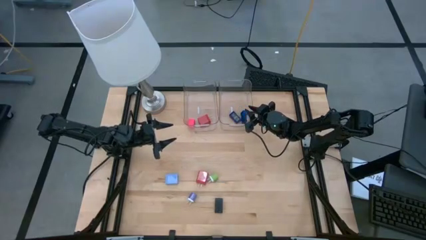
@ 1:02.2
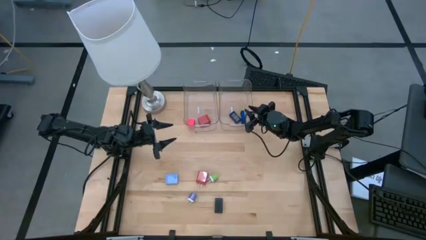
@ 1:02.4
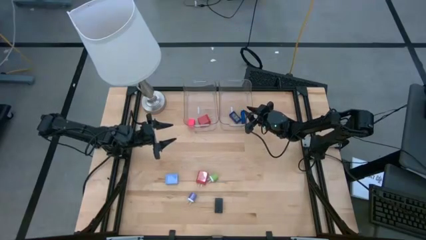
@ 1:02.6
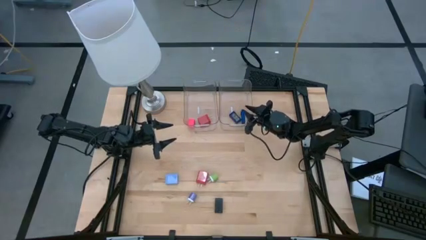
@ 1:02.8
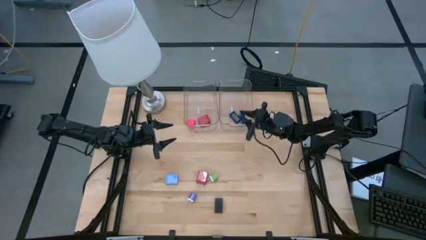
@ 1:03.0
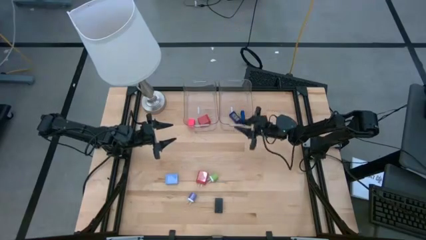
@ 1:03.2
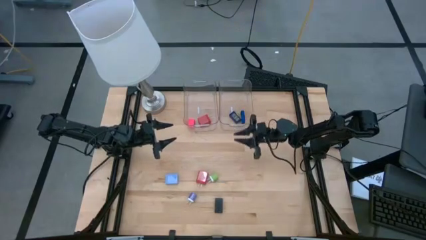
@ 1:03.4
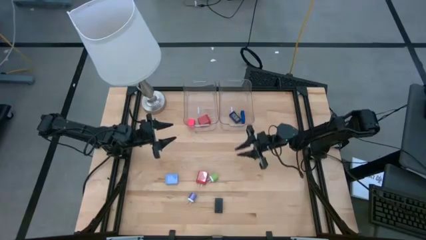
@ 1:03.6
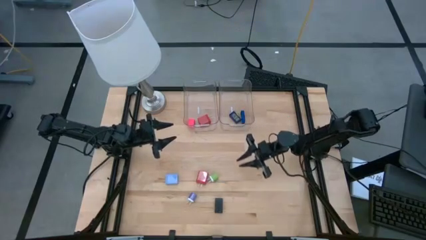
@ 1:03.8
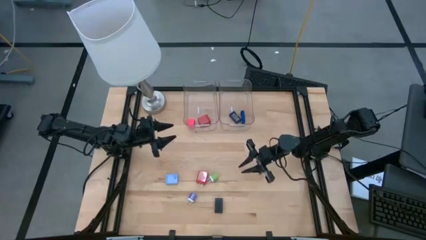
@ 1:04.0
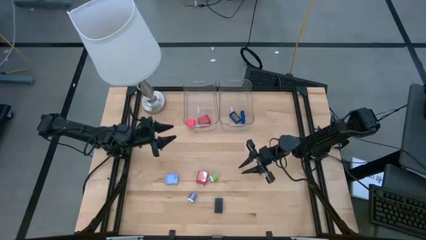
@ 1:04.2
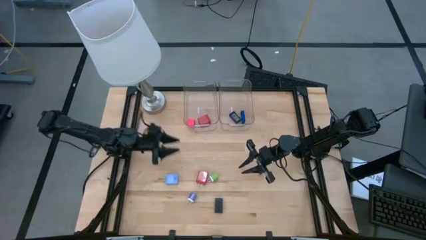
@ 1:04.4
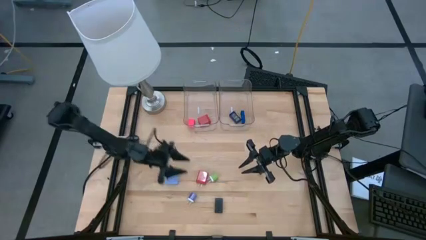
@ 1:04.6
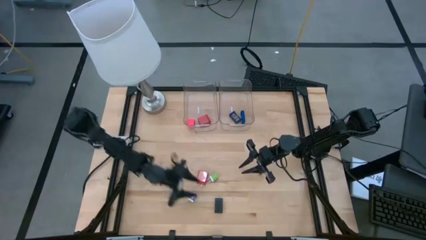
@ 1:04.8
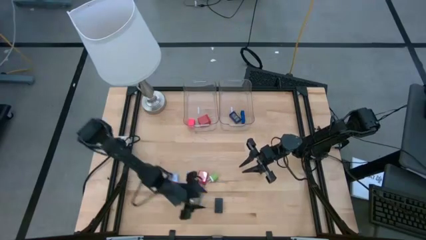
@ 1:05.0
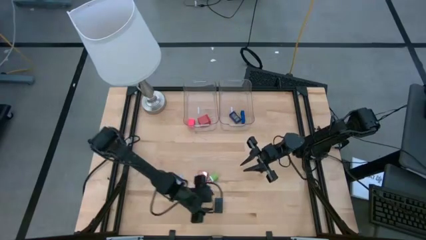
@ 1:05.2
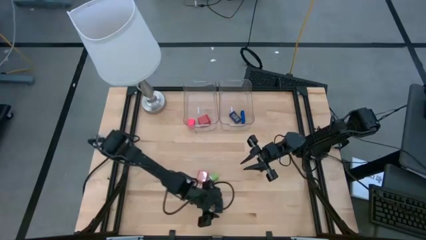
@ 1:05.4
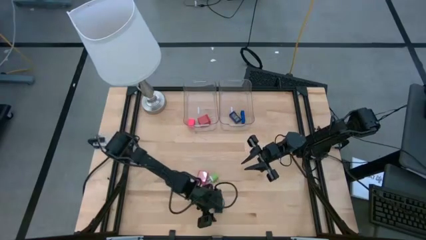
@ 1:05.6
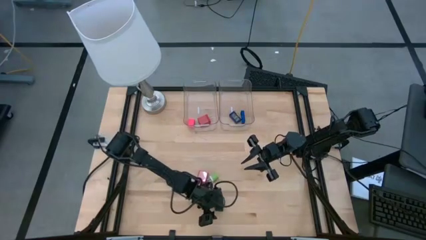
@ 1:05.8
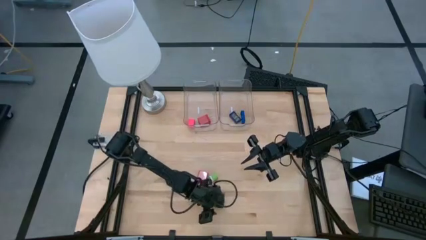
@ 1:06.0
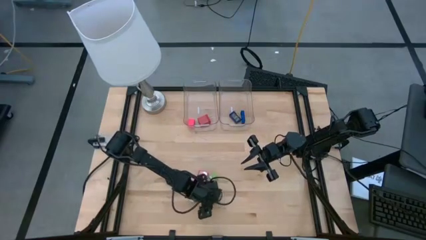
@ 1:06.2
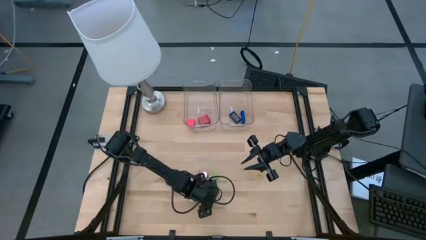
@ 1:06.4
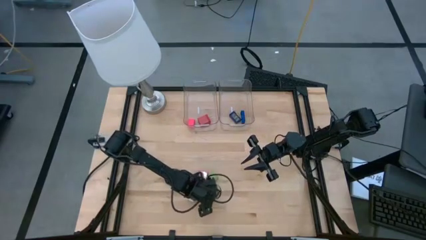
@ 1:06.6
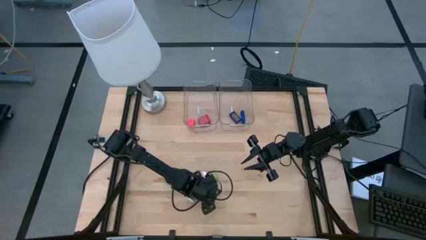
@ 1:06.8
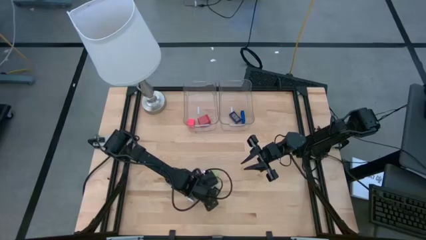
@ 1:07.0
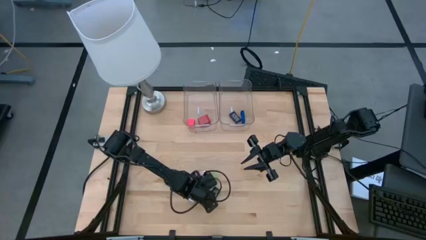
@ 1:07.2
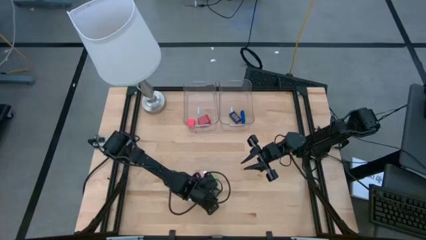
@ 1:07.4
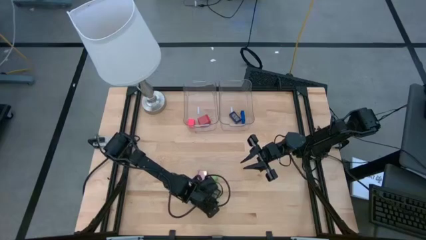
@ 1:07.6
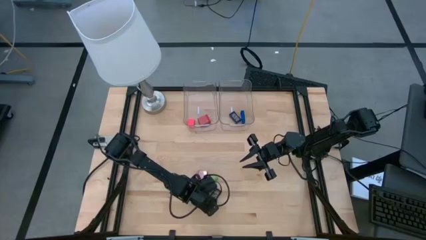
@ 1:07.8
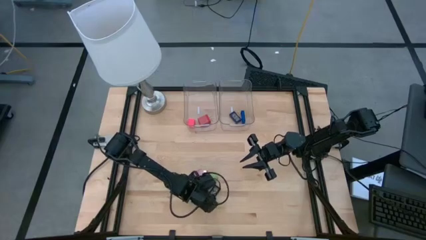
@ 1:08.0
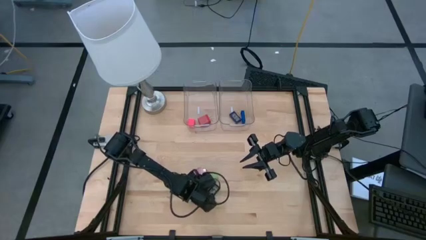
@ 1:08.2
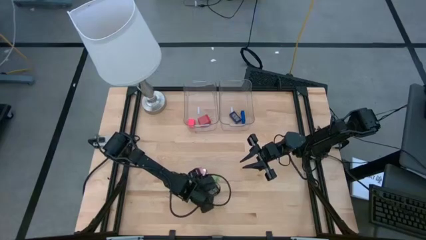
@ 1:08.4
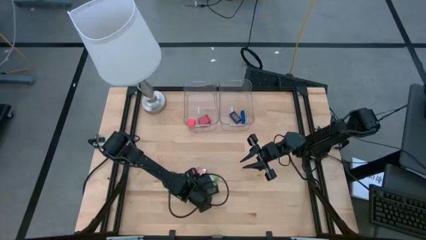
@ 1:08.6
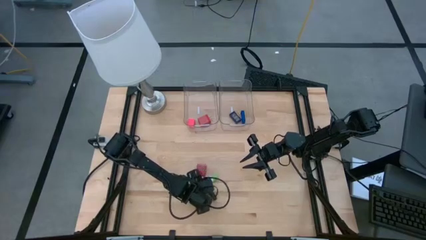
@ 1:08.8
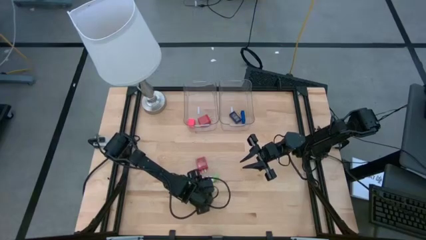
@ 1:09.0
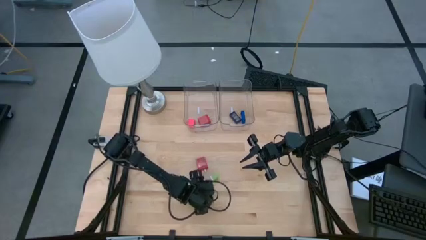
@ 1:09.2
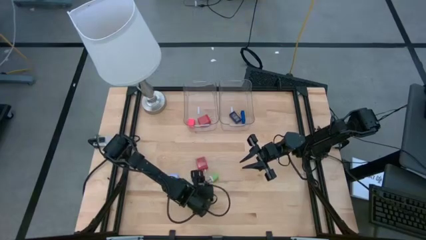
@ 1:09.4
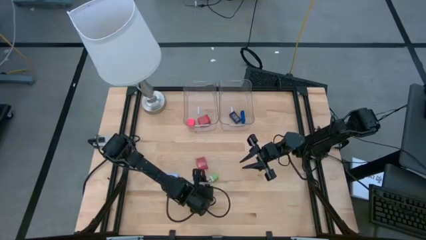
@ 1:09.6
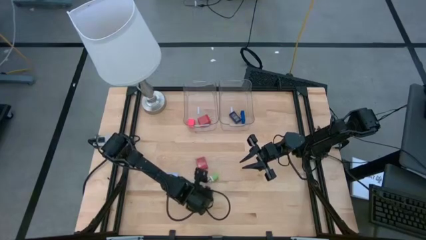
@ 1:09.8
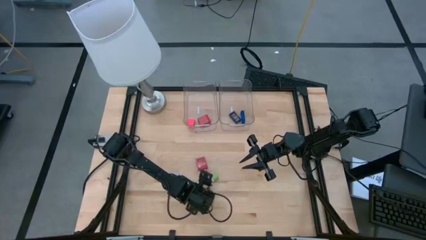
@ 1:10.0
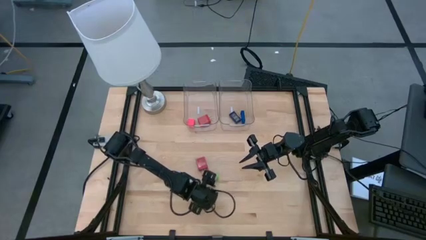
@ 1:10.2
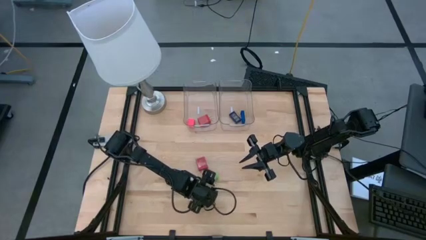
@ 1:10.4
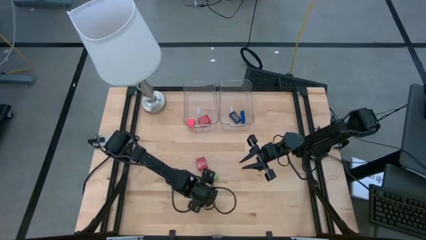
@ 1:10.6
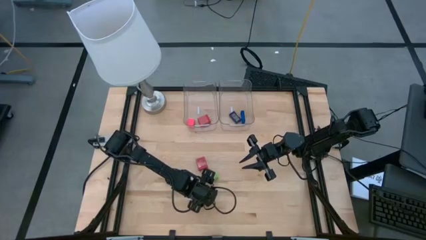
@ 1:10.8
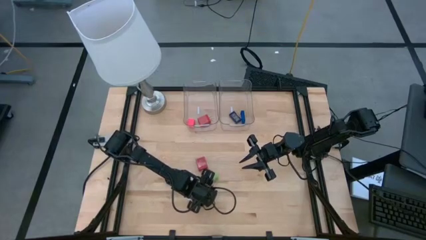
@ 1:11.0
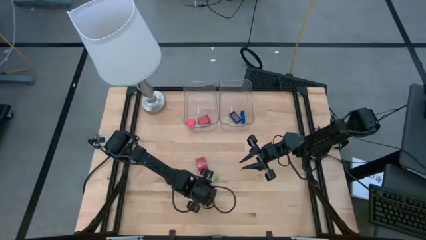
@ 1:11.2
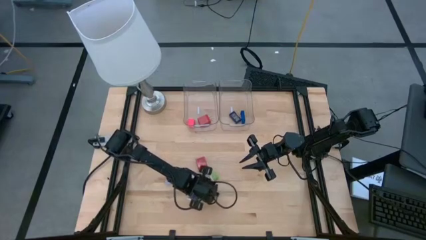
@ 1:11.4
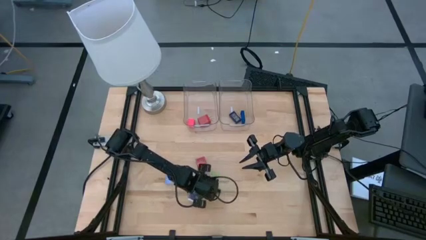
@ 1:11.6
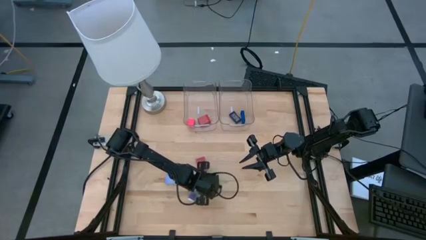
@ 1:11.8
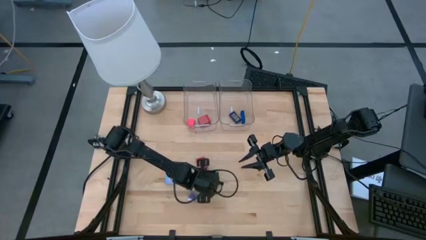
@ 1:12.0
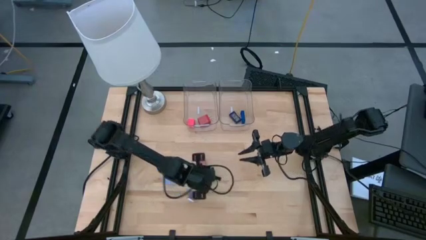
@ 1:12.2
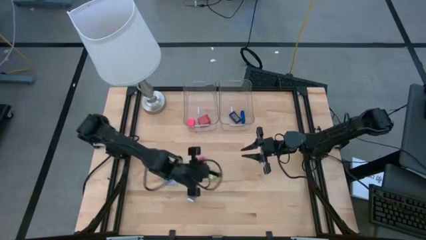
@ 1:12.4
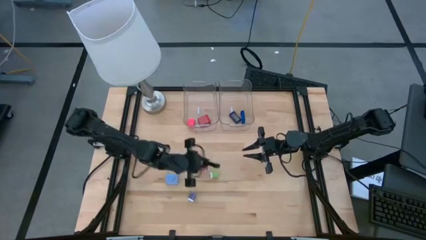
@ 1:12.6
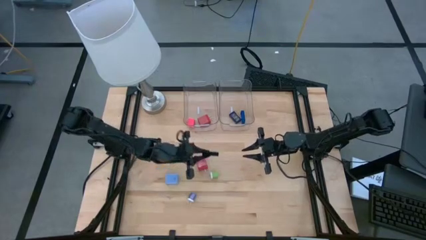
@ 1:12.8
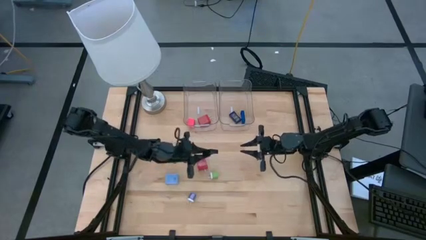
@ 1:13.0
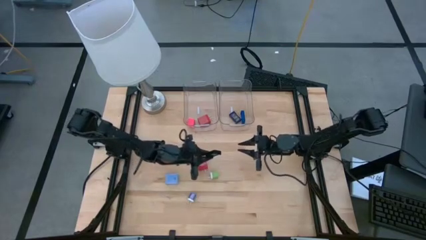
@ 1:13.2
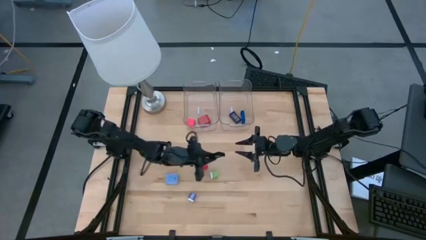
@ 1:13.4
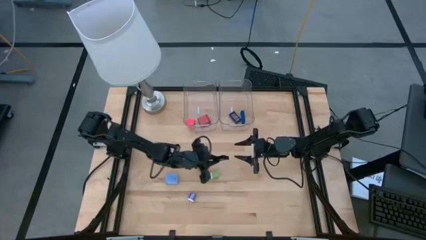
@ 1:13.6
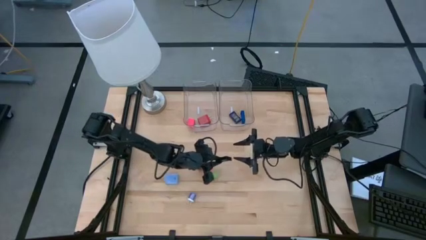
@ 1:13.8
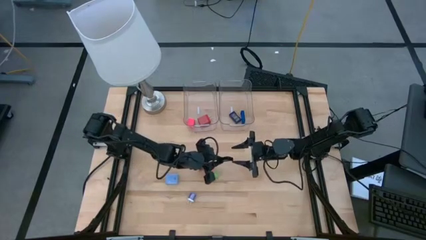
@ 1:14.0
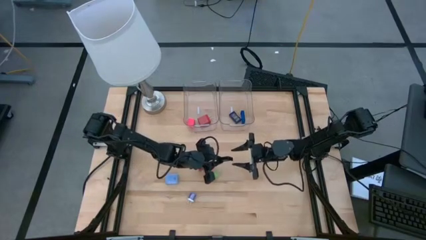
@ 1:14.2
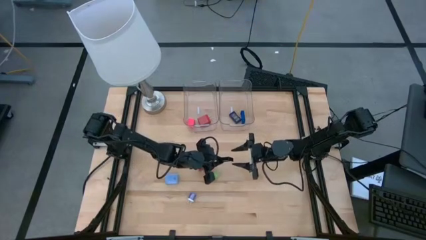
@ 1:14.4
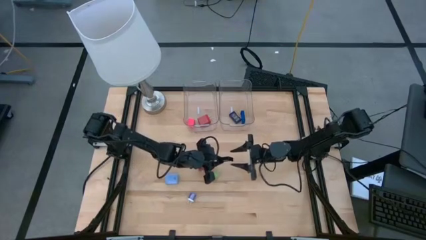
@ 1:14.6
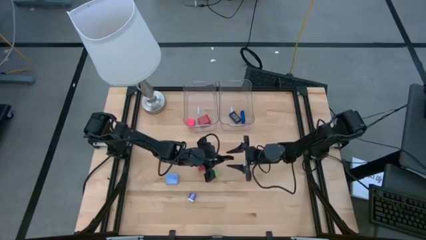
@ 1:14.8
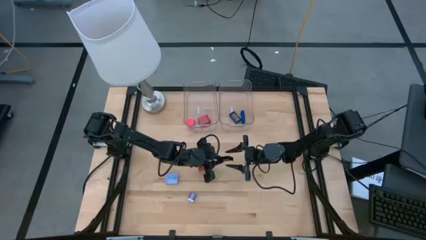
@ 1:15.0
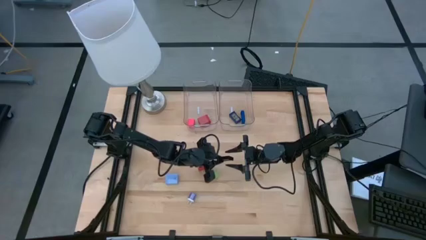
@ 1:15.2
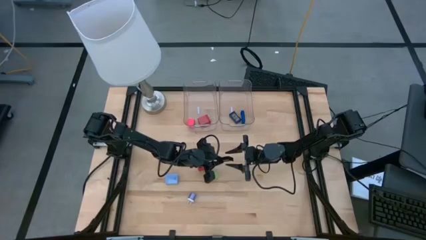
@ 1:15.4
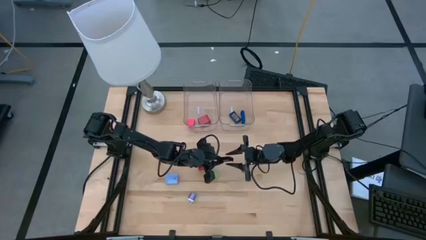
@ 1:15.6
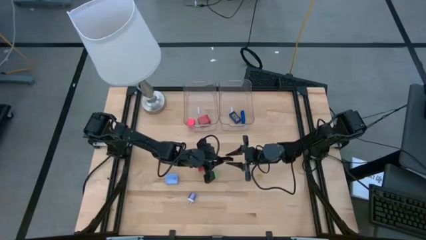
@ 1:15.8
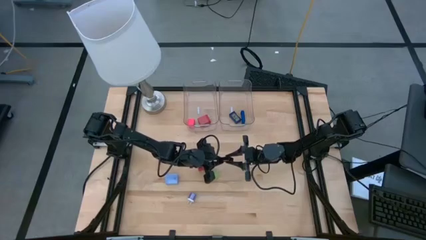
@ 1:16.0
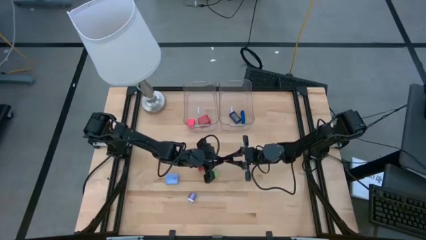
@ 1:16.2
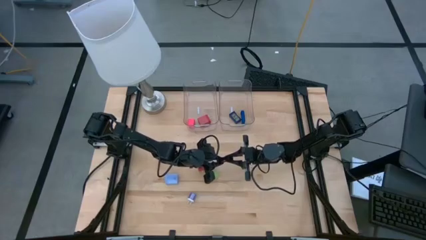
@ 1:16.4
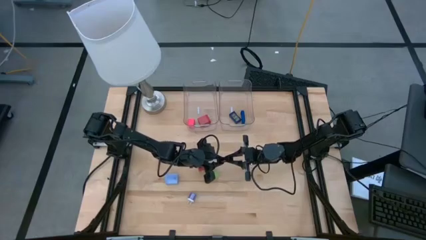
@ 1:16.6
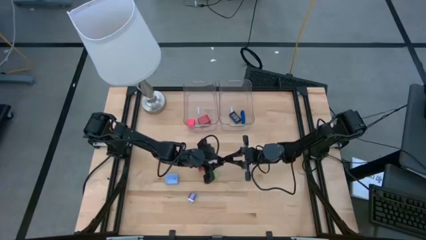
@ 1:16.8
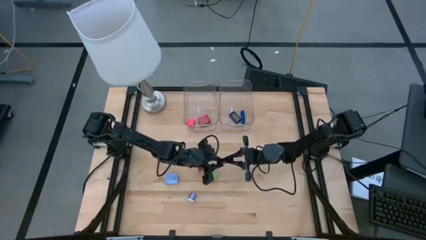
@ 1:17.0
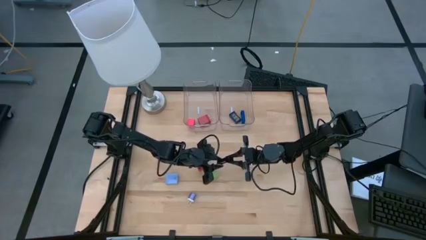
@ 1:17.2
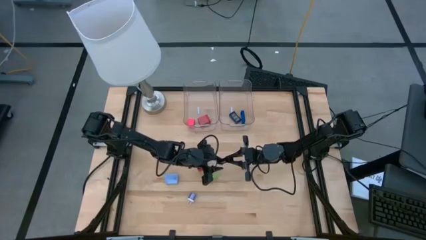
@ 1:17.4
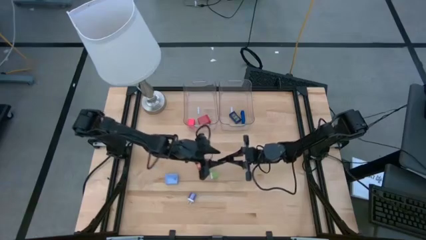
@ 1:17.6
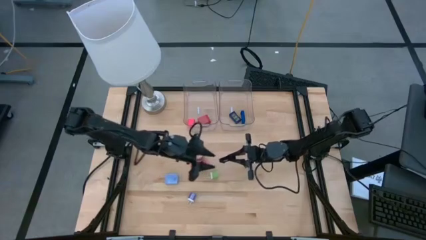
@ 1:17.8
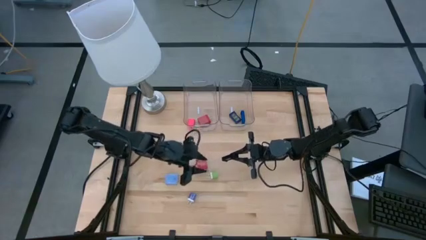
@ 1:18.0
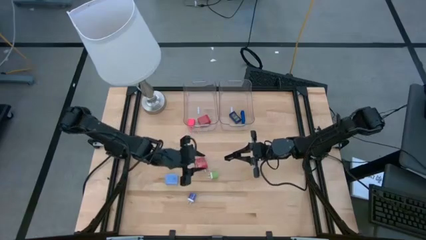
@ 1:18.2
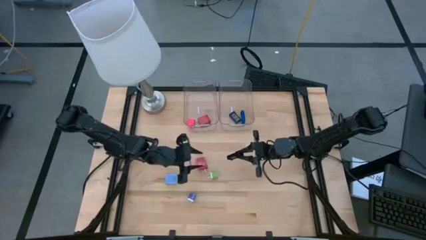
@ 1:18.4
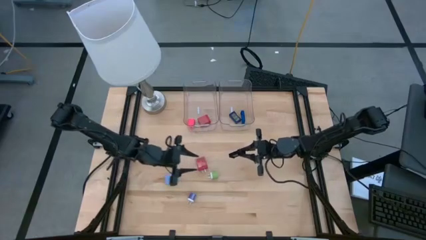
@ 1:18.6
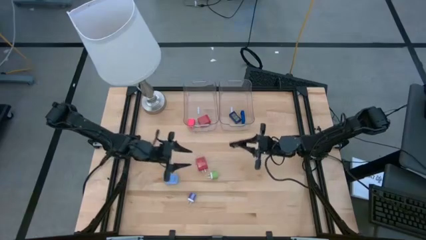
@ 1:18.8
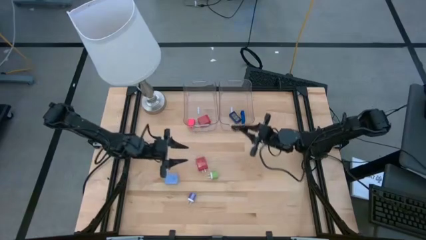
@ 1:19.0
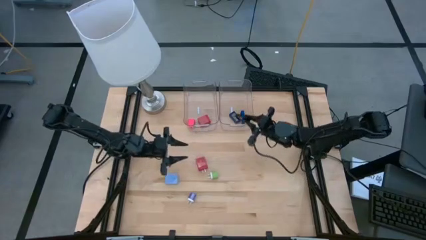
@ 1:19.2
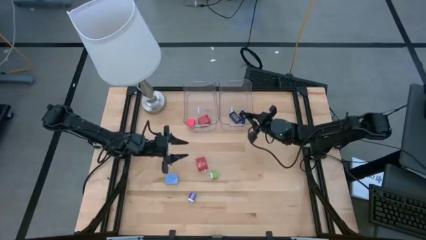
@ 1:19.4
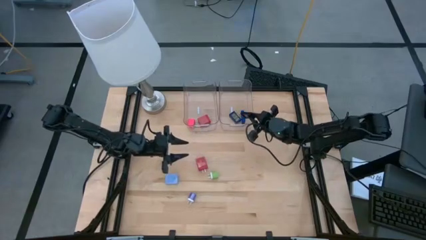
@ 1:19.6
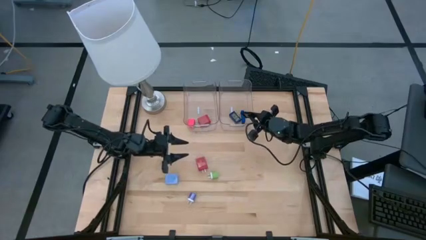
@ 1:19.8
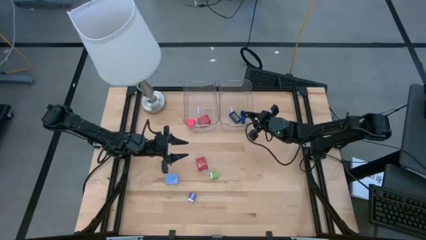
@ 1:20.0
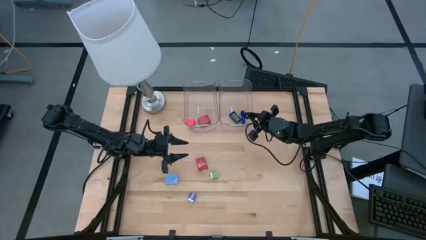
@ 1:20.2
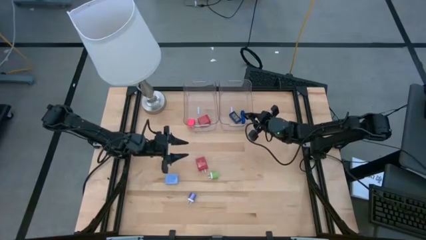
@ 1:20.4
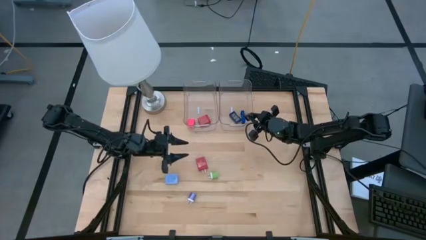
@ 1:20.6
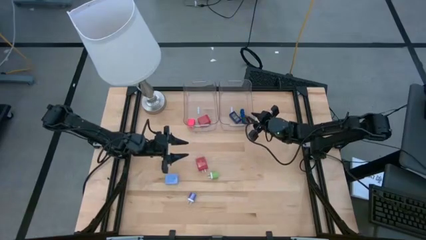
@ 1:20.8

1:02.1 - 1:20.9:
Task: Pick & Place Office items
Put the black timer into the right transparent bin
